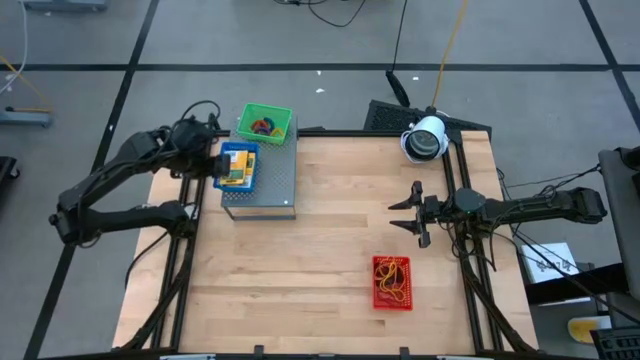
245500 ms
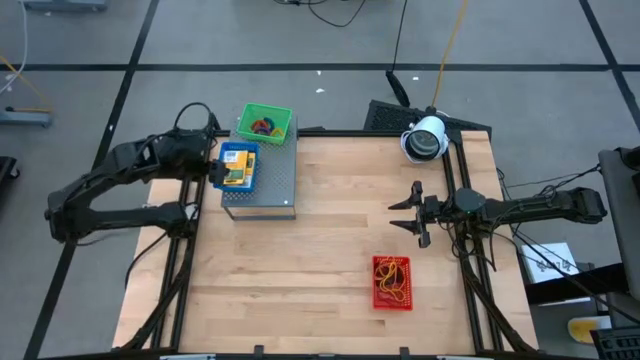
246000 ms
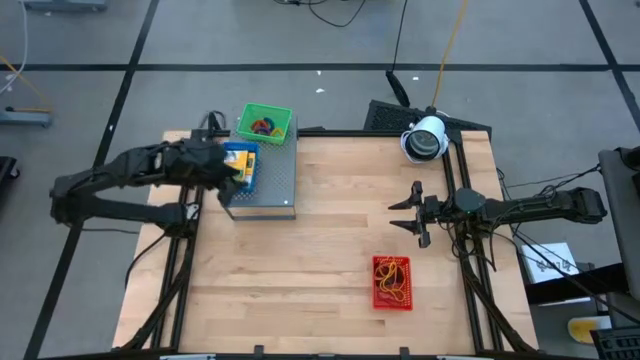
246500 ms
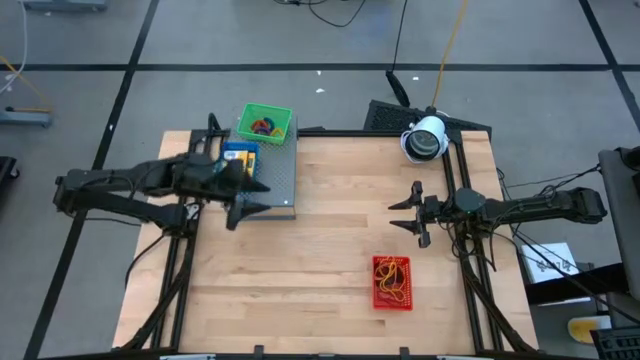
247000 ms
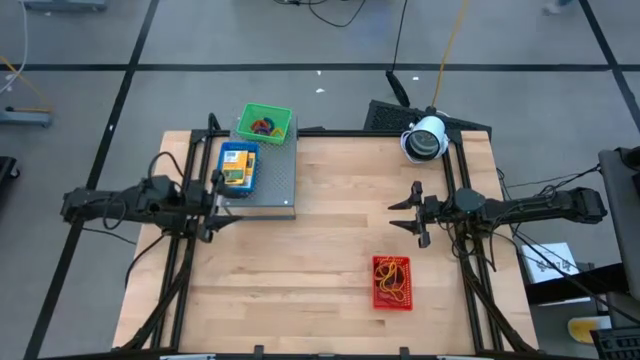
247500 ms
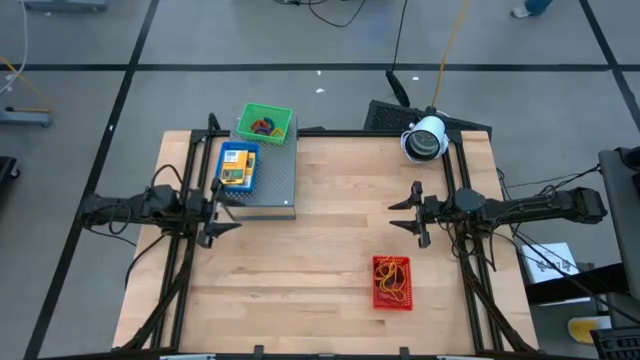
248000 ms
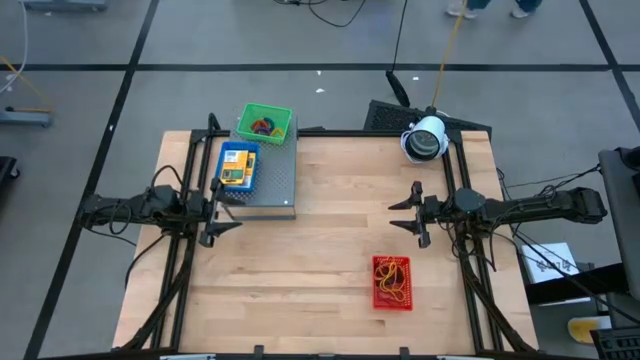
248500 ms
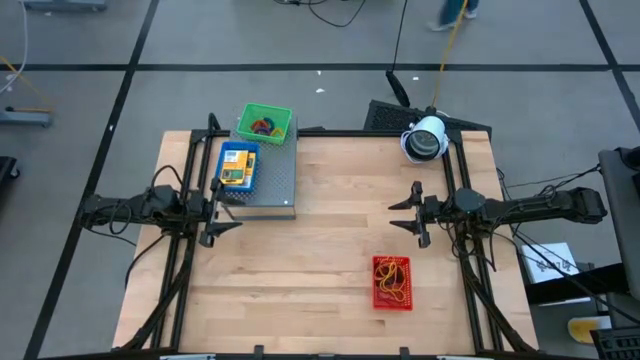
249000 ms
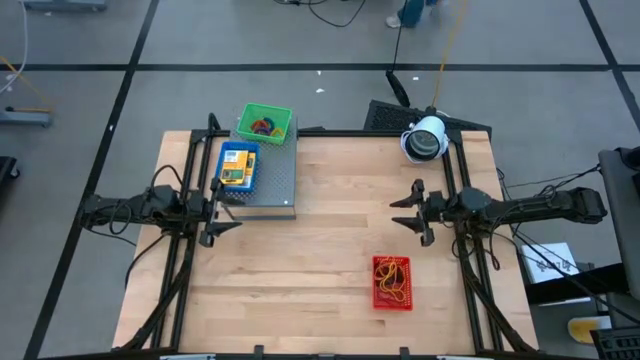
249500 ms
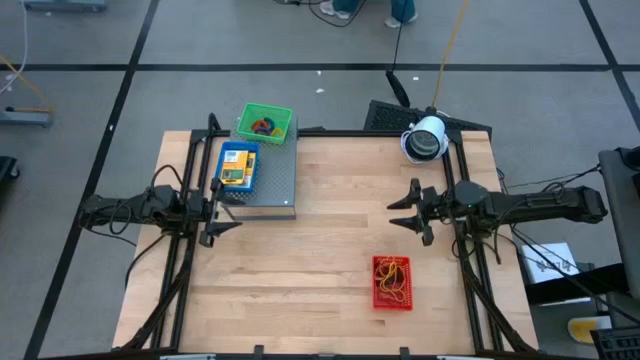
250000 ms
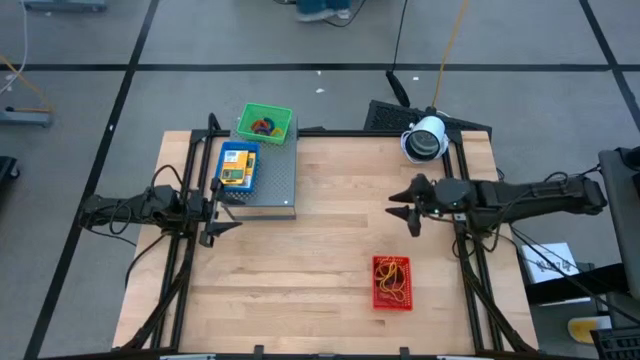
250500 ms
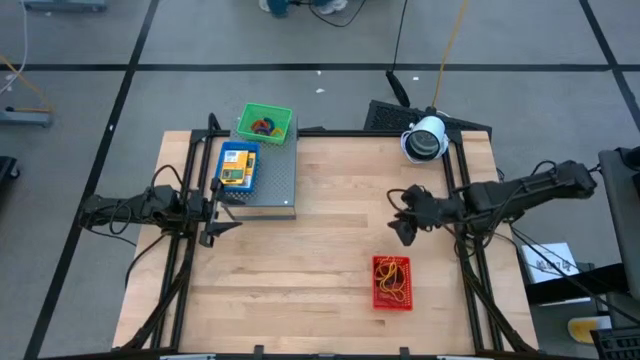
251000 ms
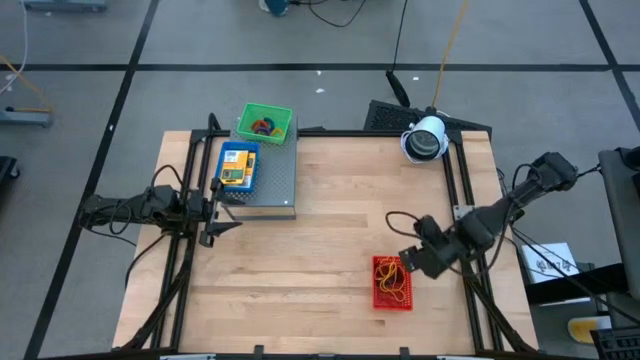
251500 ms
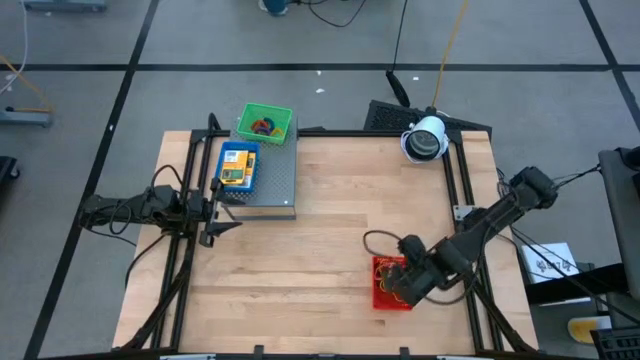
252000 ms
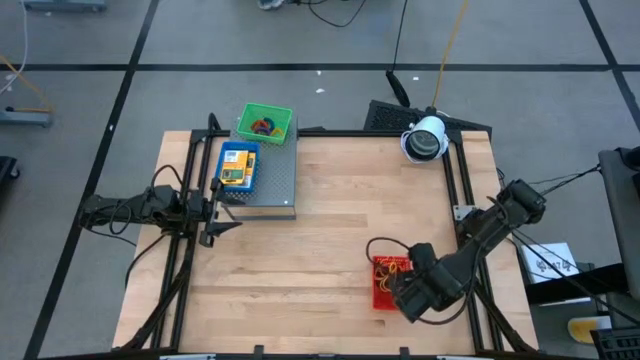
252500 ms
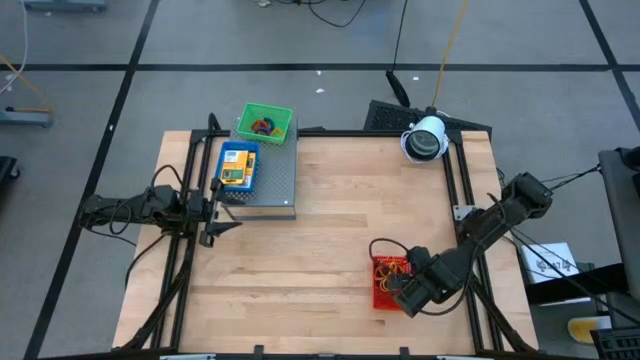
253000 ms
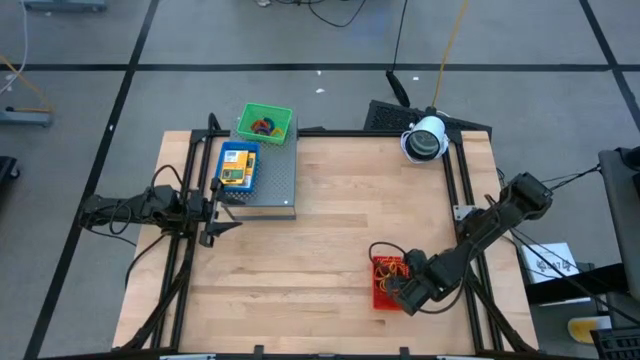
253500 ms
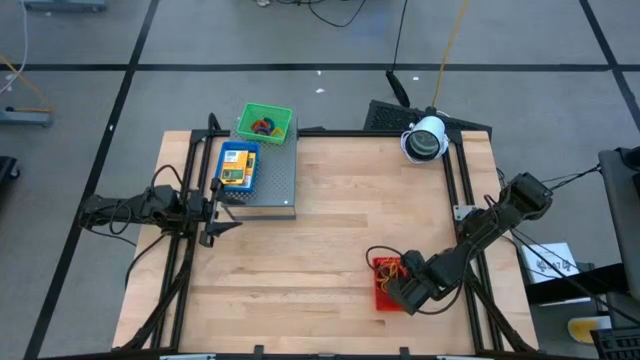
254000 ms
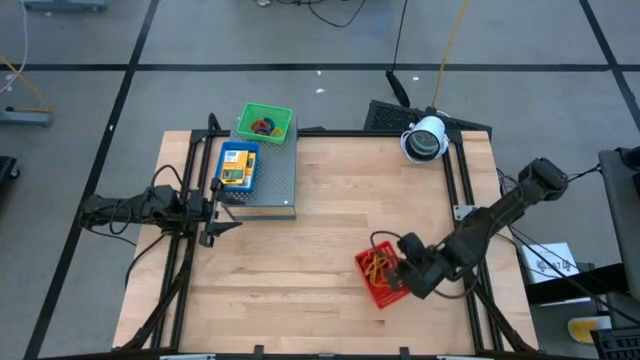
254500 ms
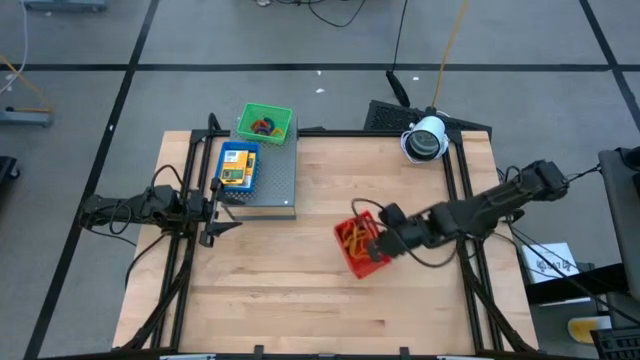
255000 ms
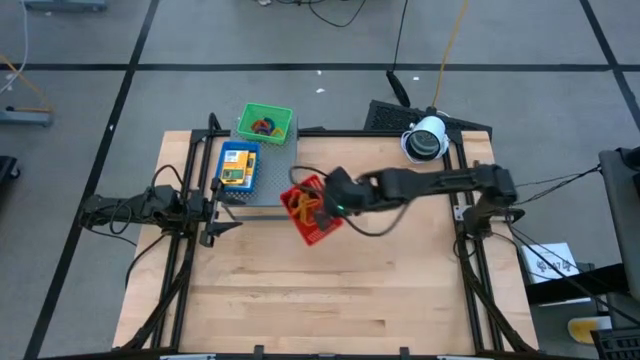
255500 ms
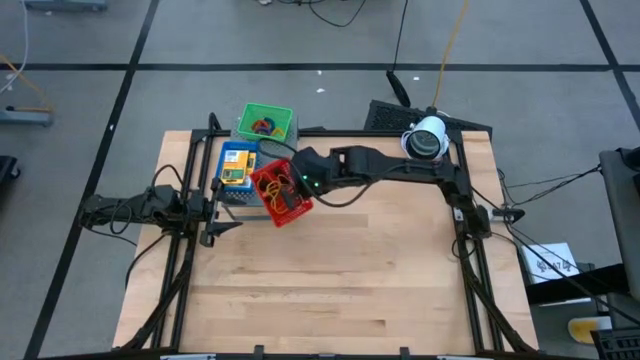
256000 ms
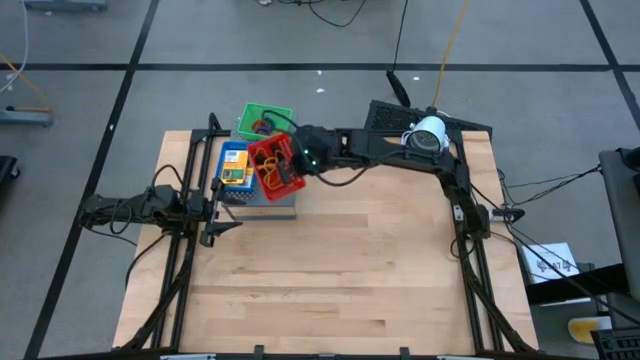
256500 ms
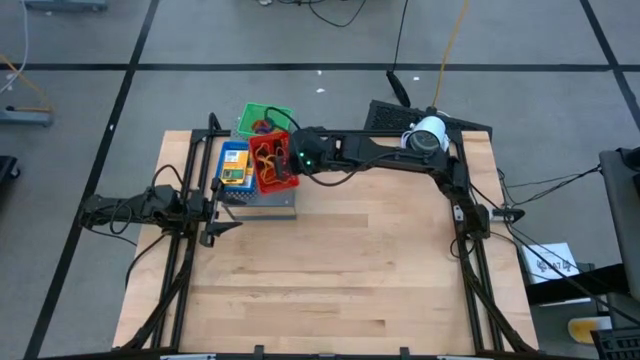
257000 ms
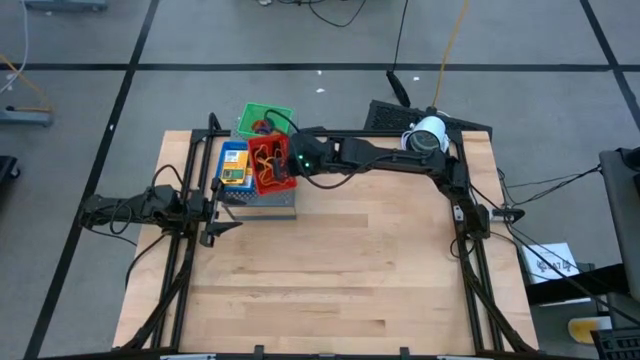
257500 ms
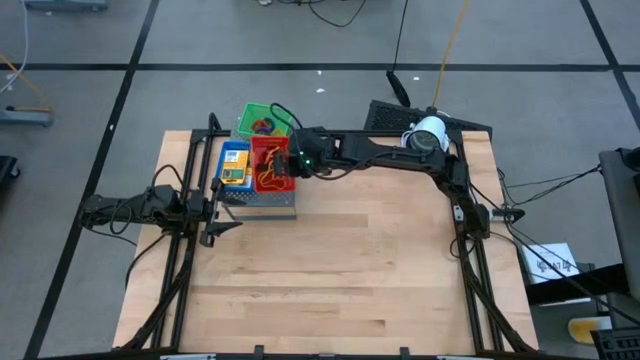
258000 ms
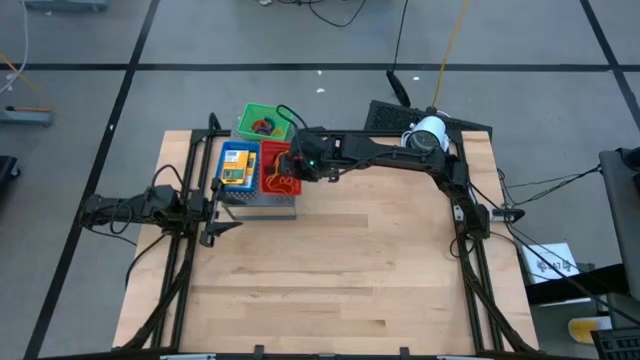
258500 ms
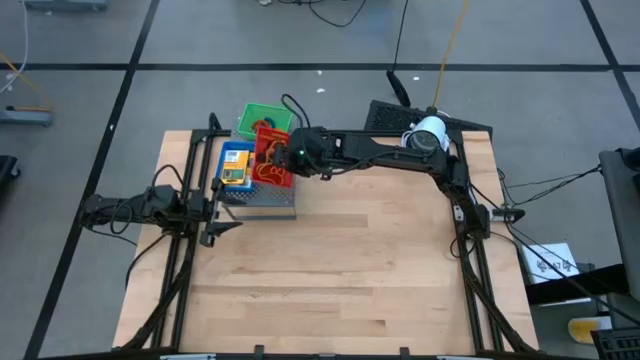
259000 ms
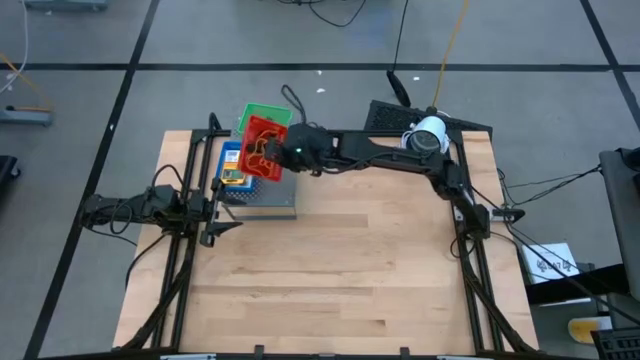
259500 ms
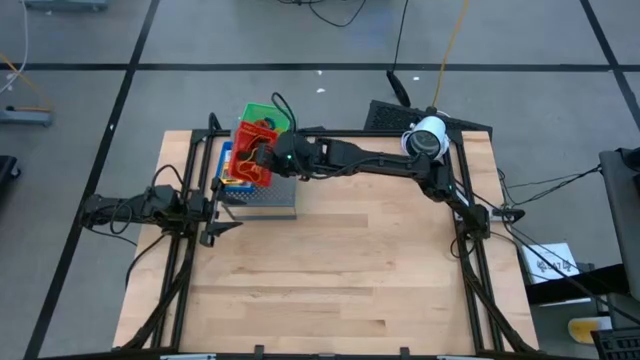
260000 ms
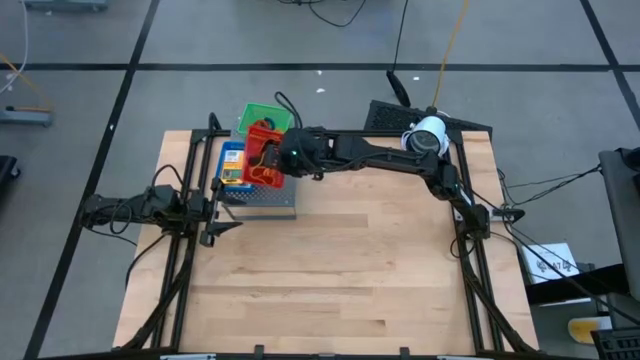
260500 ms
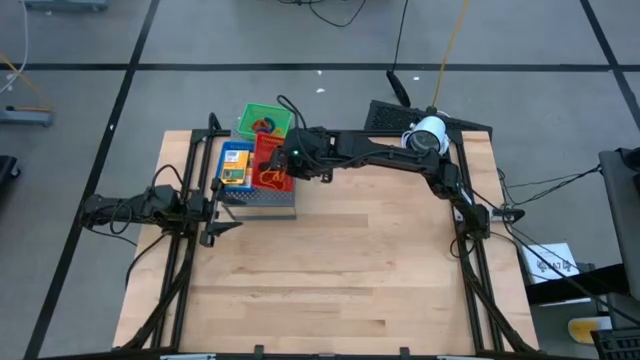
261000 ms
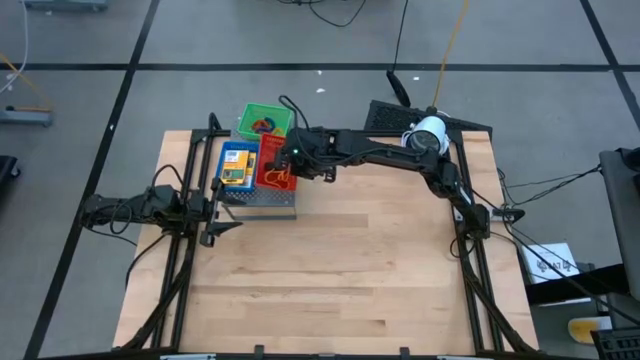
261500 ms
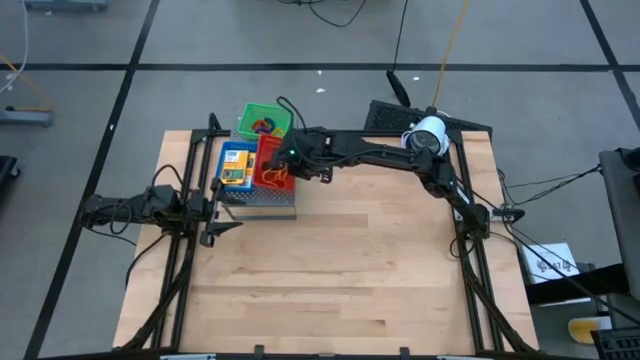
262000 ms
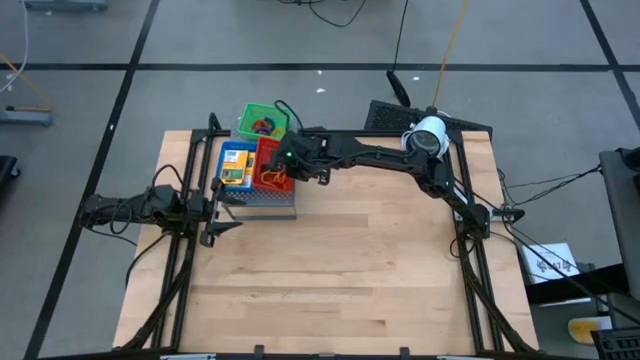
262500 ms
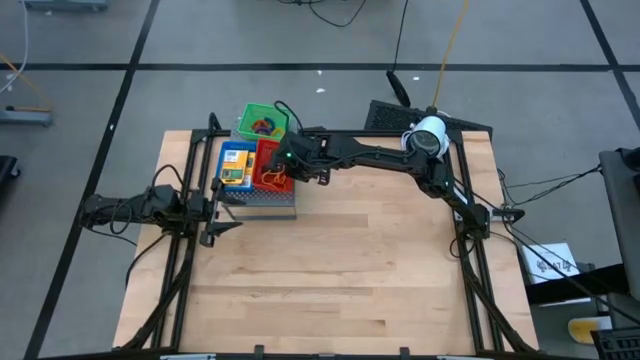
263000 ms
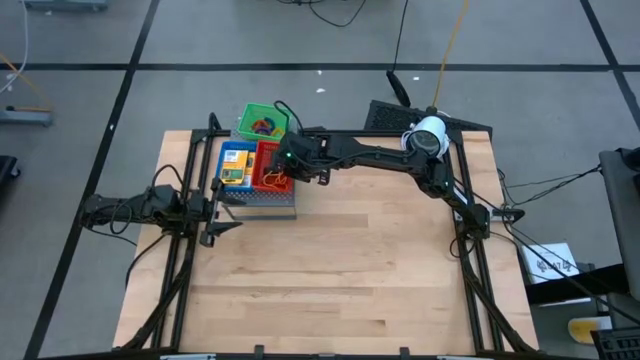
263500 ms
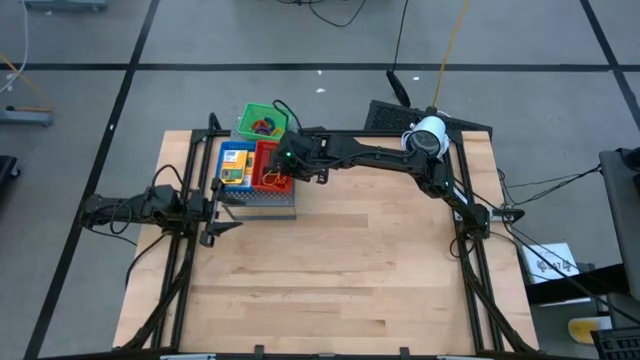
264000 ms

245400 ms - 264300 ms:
Task: Pick & Place Office Desk Supplies
Put the red bin on the shelf with rubber bands

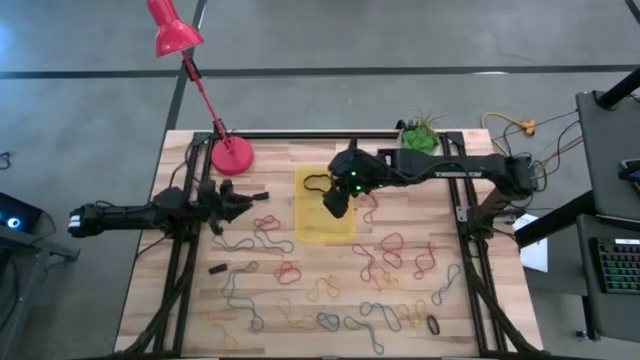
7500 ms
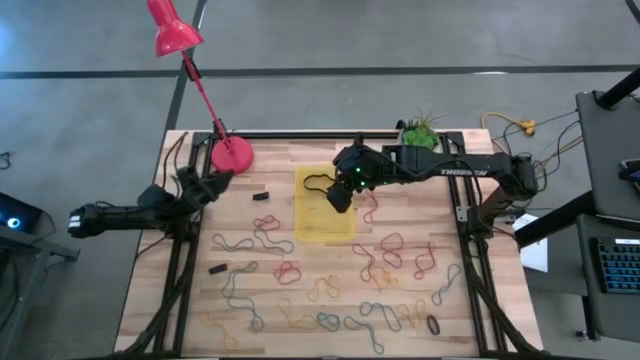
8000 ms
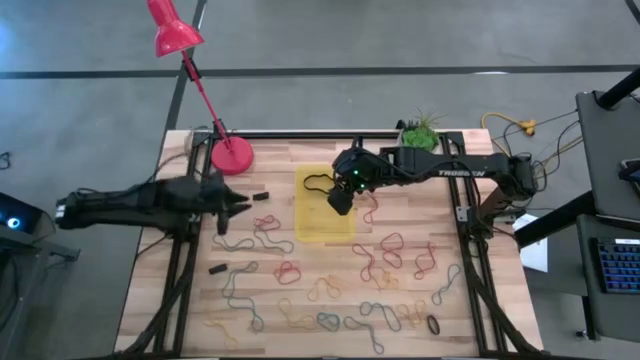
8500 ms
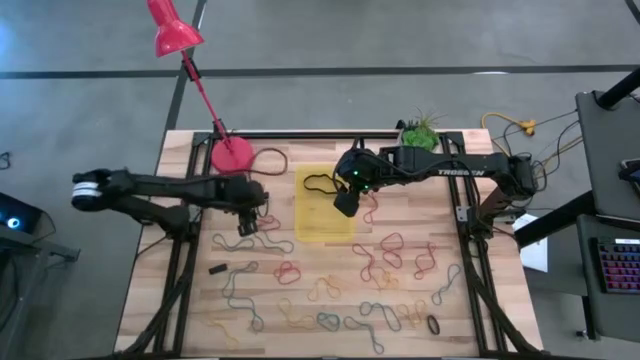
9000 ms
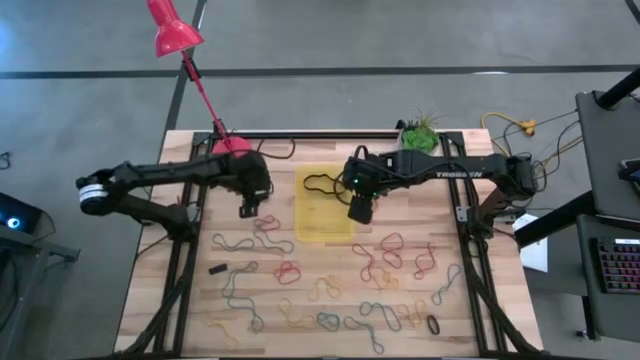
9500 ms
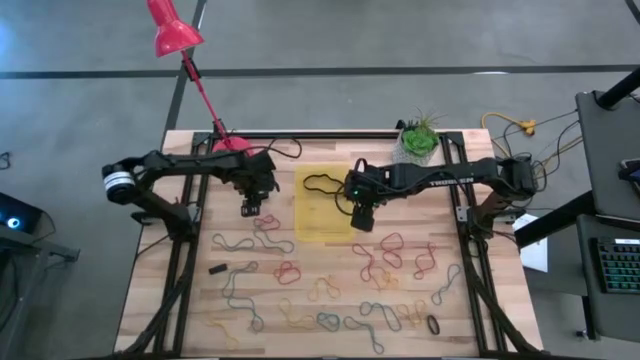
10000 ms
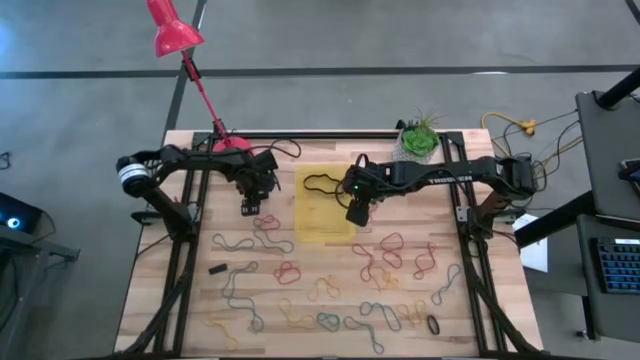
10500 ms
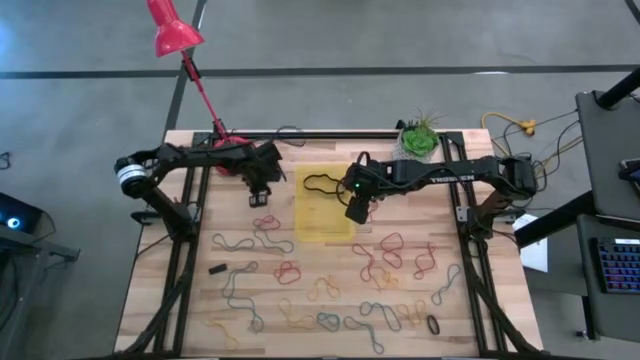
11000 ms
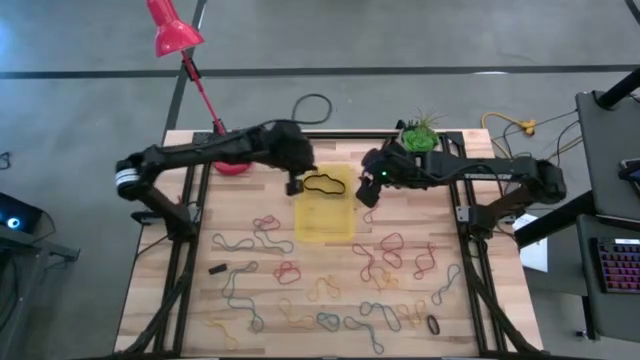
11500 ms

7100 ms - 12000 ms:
Task: Pick and place rubber bands into bin
Put the black rubber band into the yellow bin
